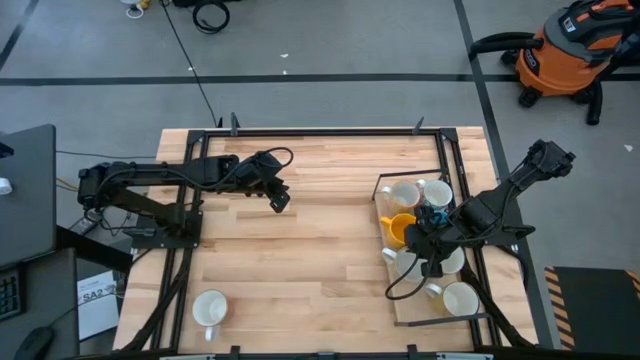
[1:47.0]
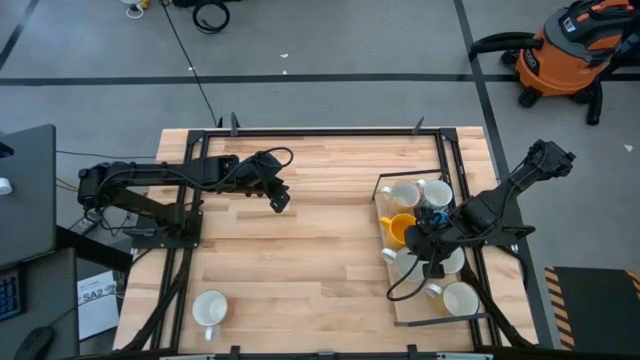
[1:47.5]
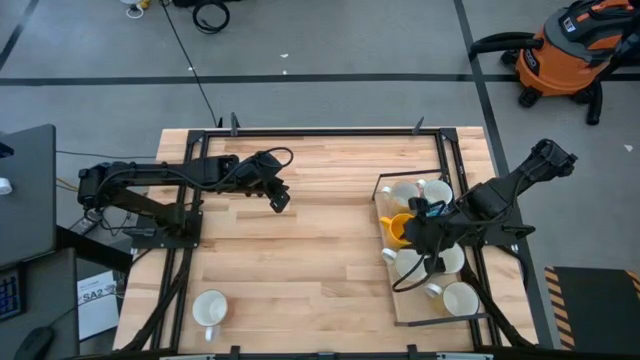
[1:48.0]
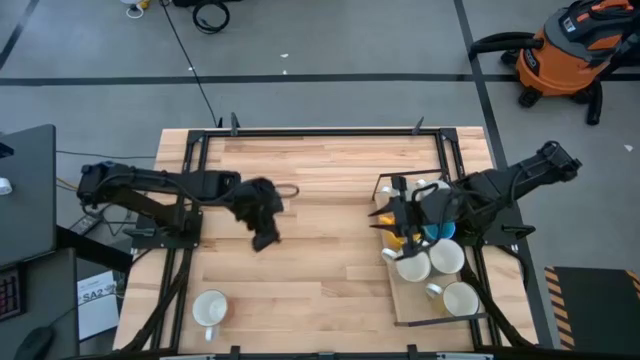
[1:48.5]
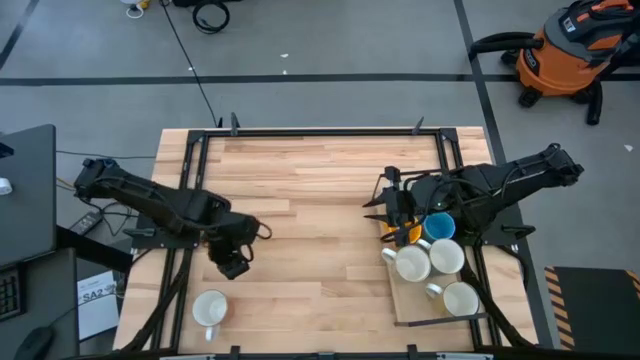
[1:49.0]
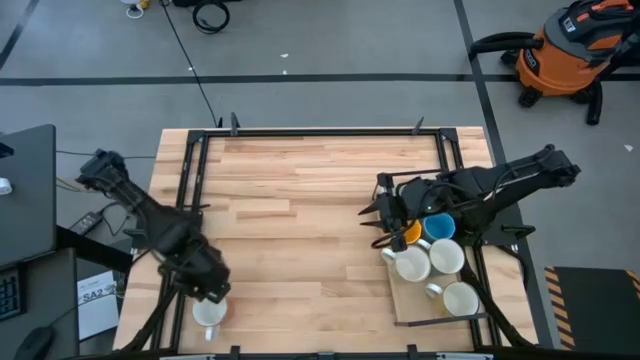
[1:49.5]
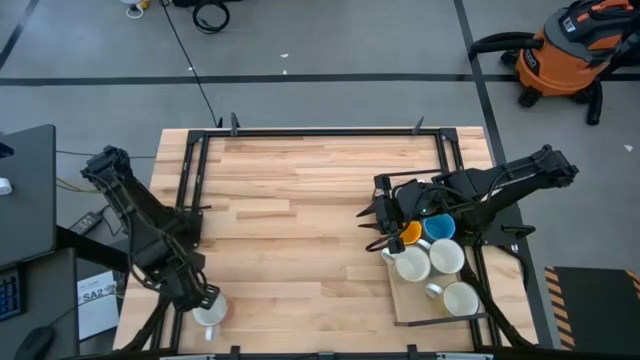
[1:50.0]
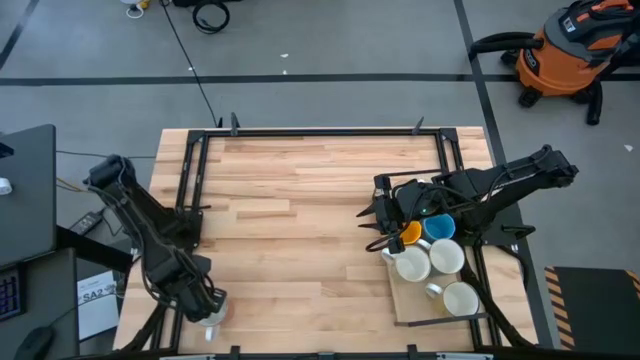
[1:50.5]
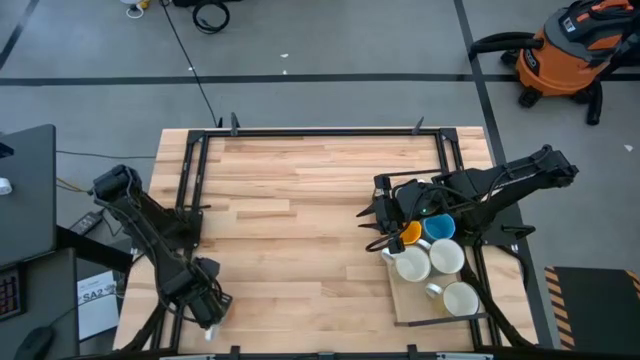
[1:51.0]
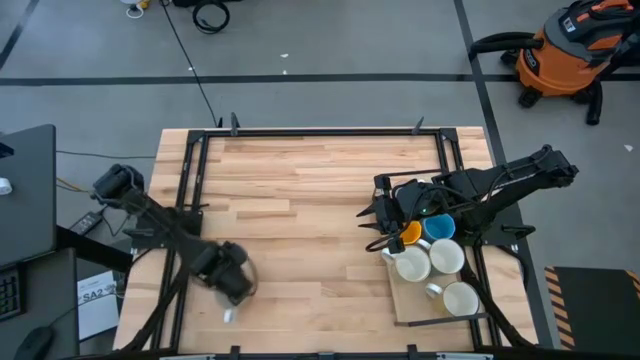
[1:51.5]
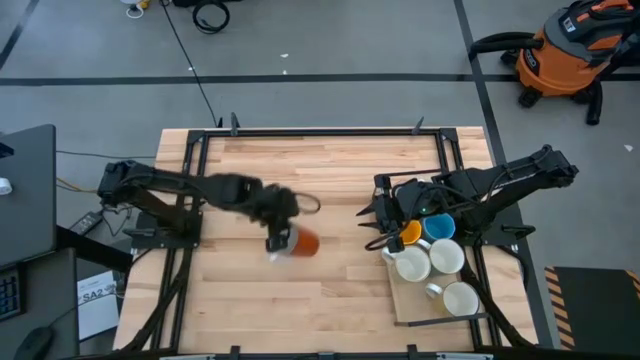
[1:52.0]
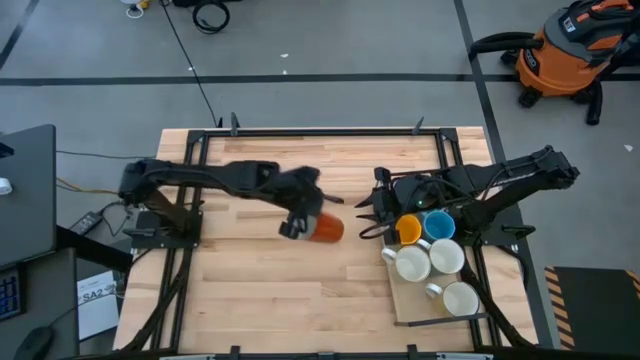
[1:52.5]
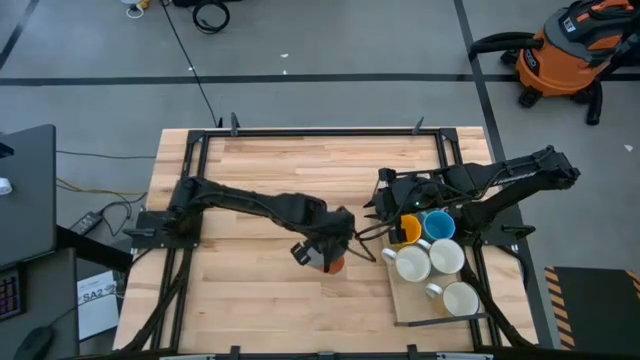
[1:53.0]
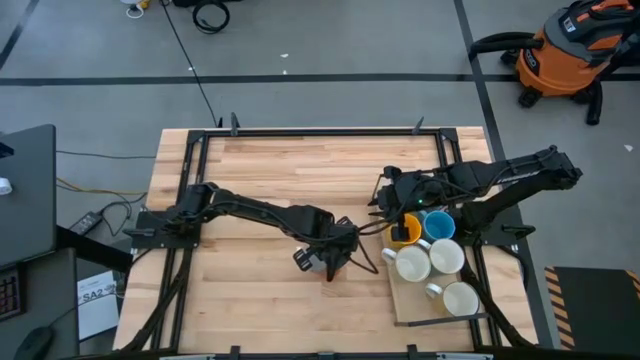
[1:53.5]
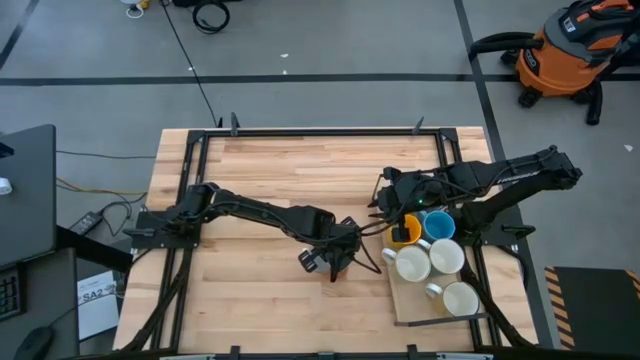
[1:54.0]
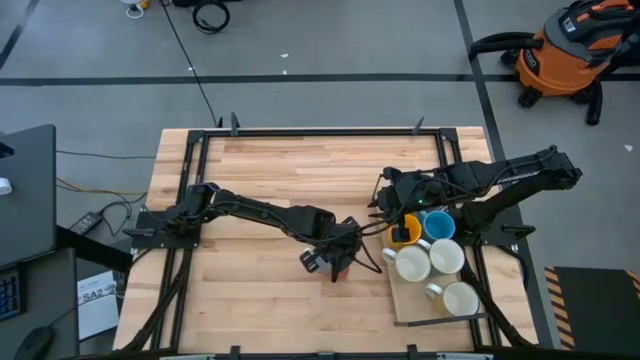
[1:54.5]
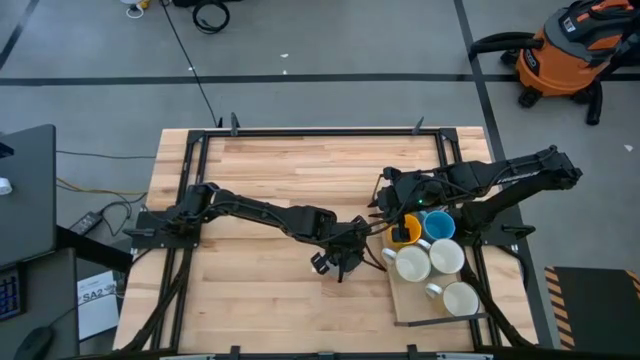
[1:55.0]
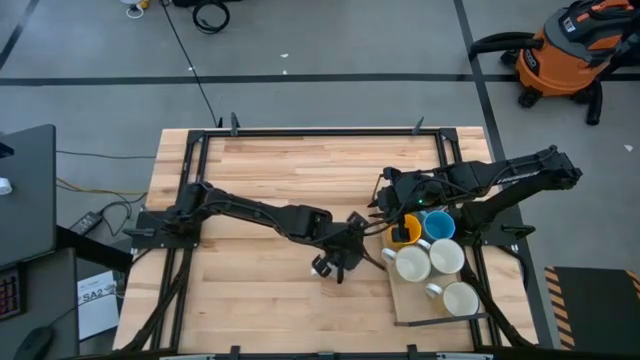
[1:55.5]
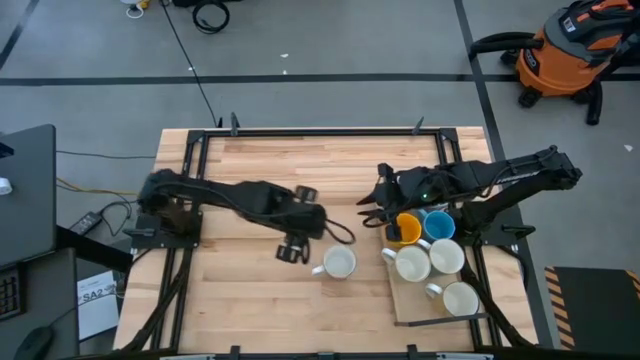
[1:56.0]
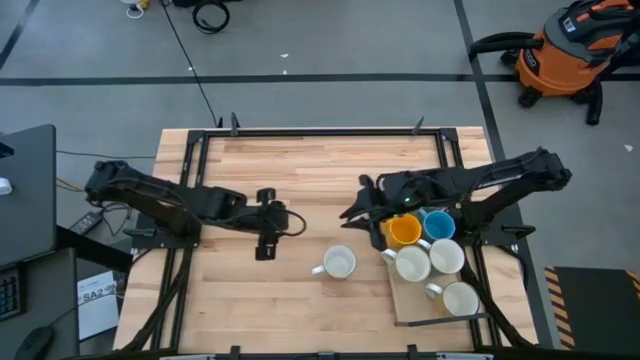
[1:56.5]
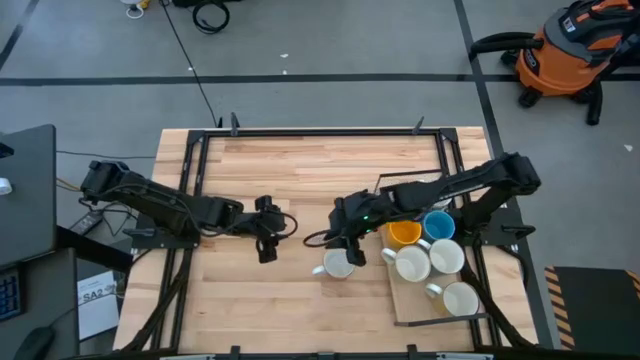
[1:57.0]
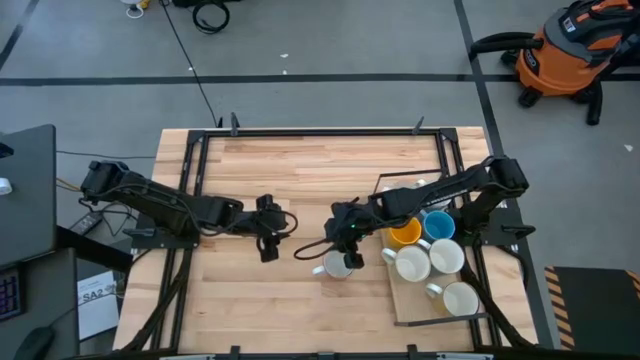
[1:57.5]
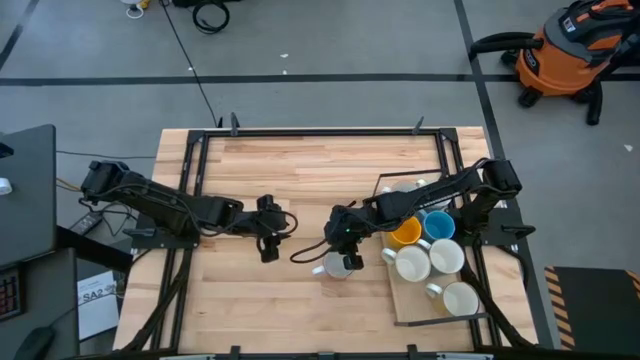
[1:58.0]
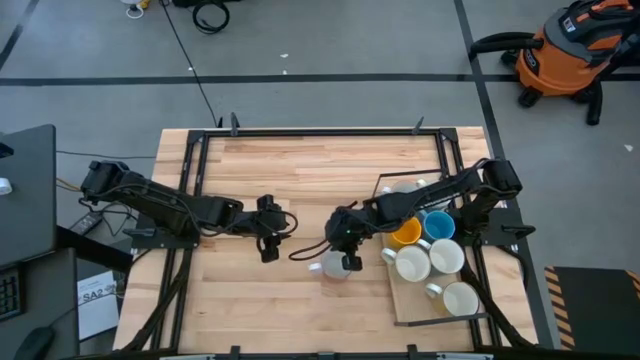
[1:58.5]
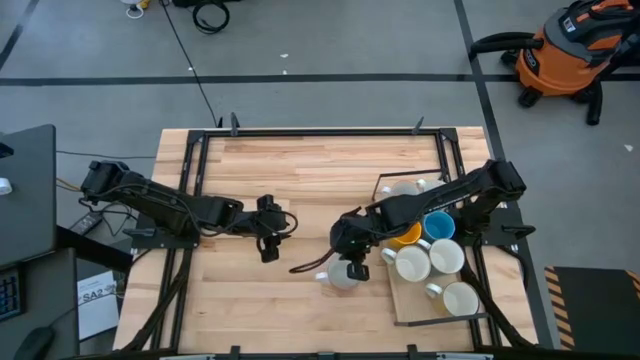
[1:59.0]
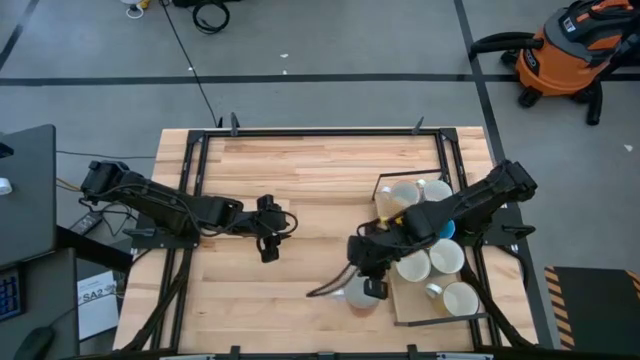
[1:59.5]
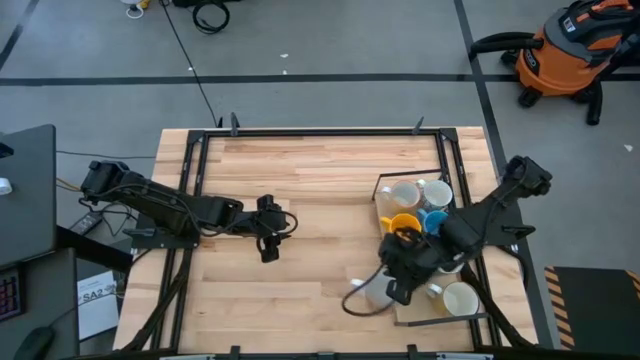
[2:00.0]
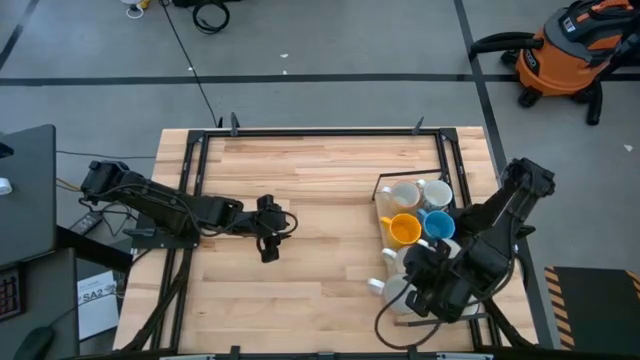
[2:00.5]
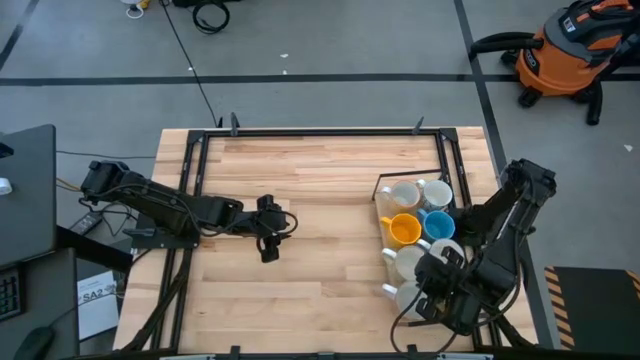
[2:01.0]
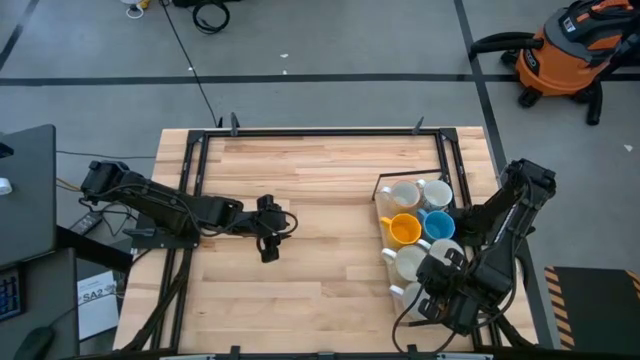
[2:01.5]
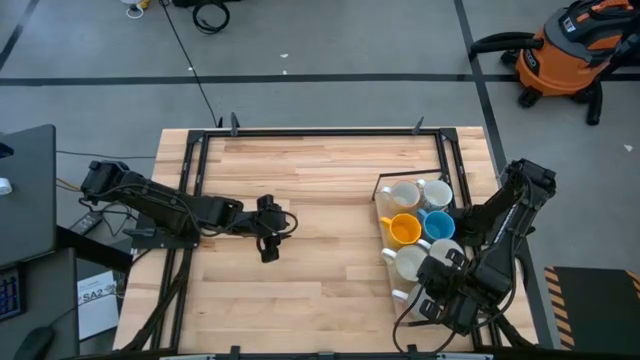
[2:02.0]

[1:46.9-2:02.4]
Task: Place coffee mugs
Put the brown mug on the shelf
